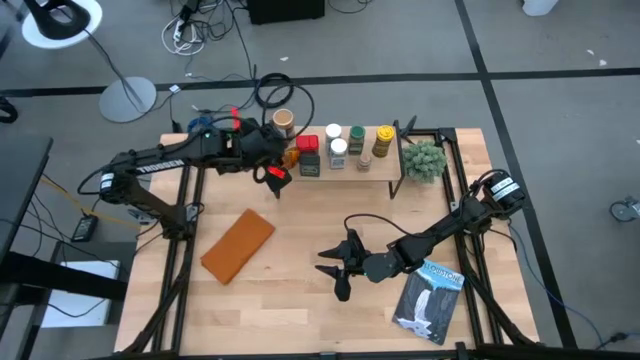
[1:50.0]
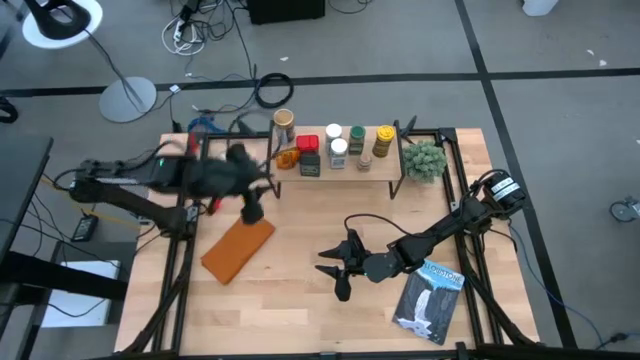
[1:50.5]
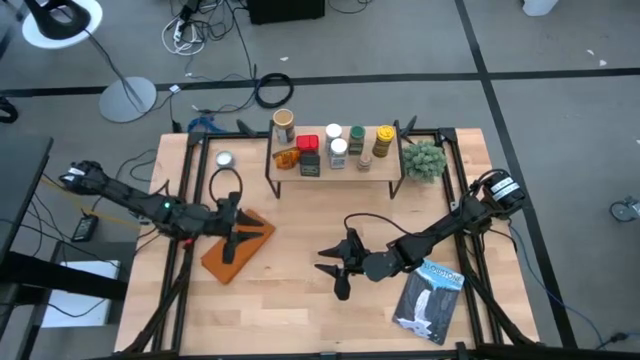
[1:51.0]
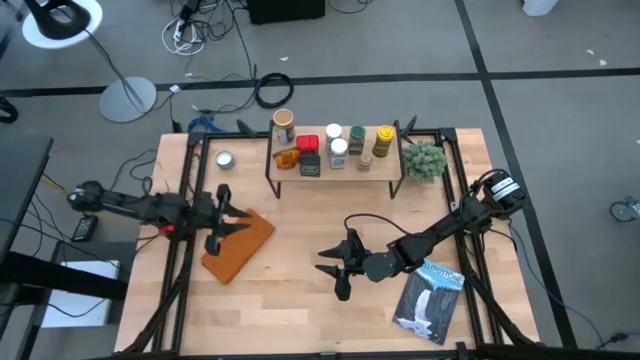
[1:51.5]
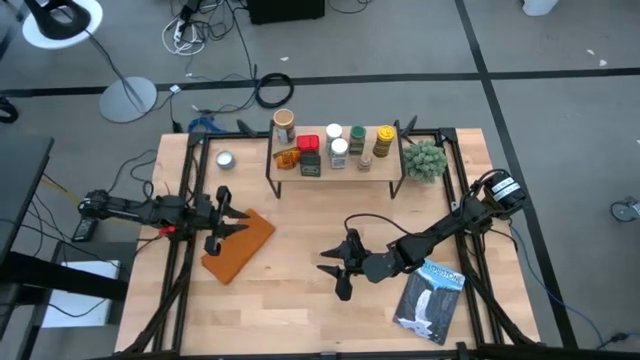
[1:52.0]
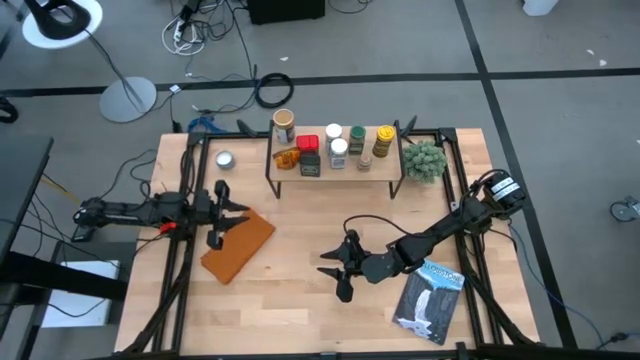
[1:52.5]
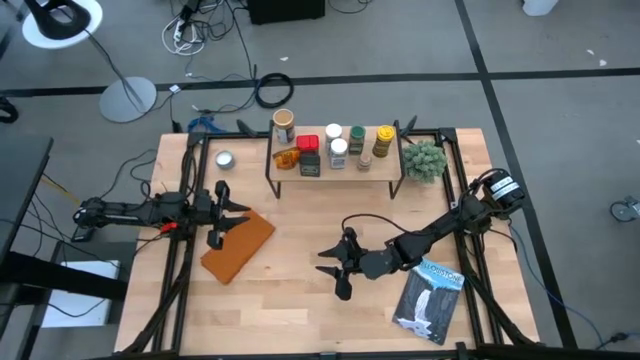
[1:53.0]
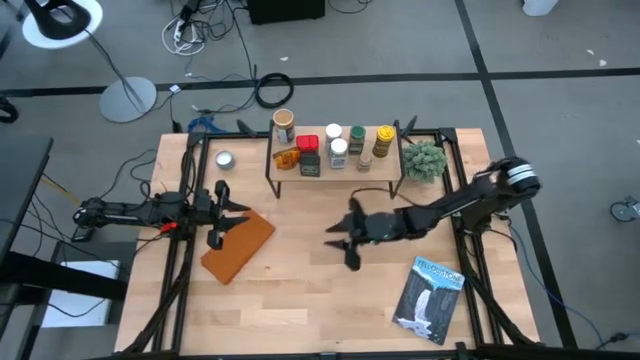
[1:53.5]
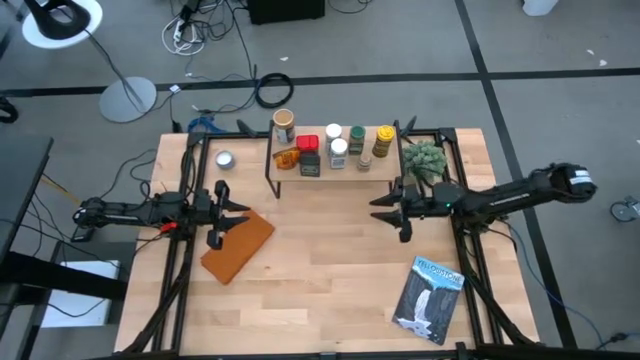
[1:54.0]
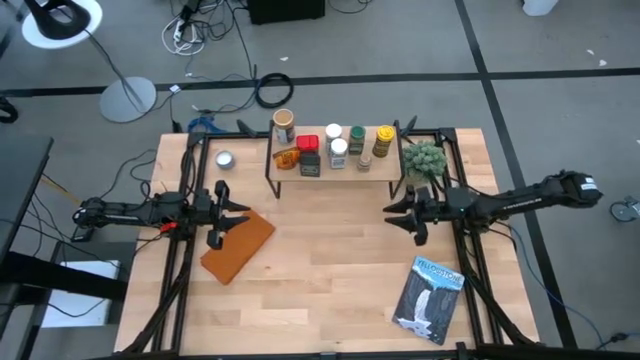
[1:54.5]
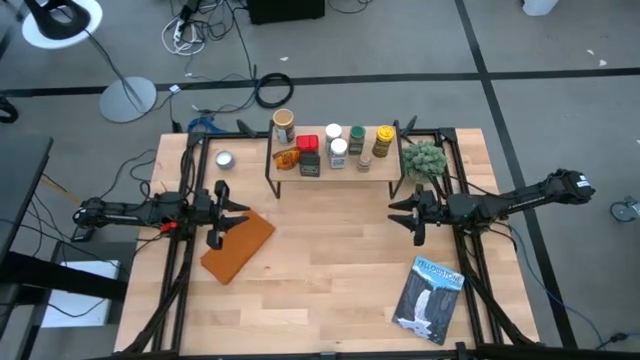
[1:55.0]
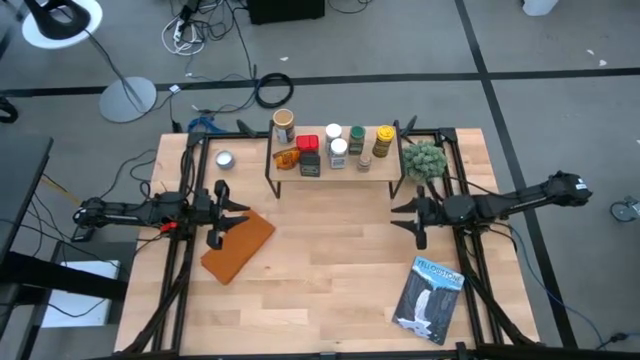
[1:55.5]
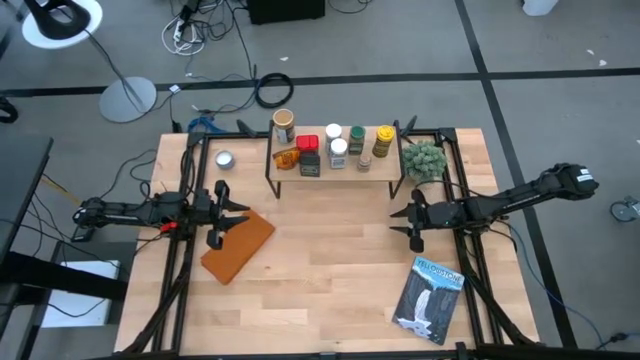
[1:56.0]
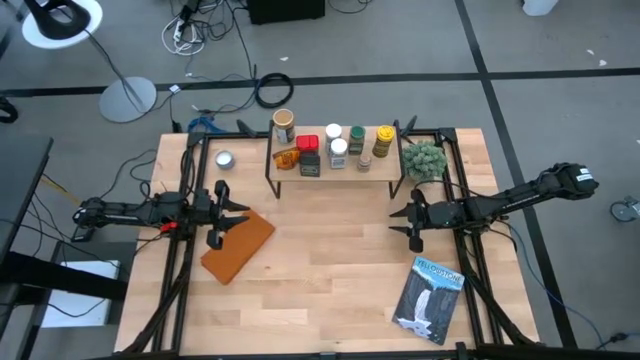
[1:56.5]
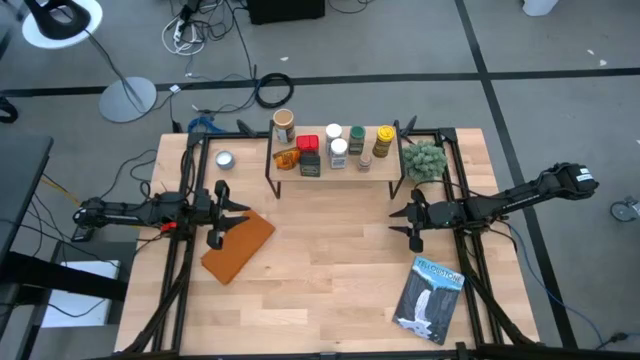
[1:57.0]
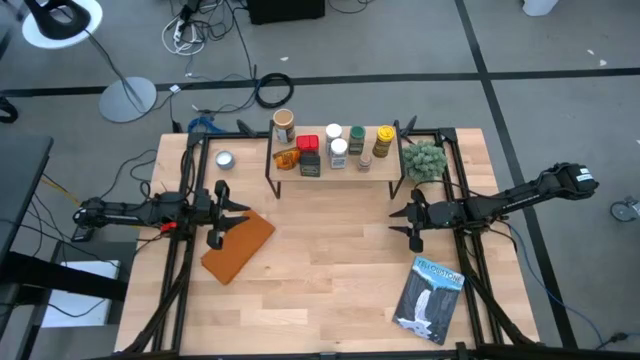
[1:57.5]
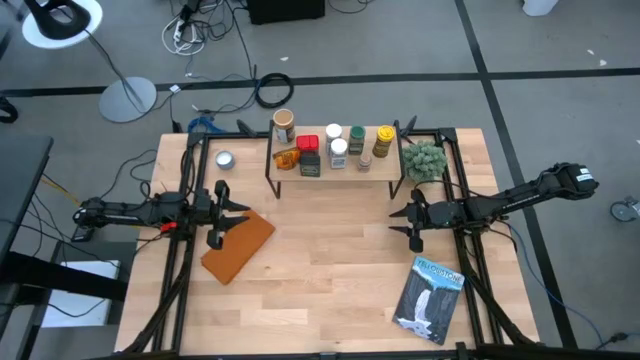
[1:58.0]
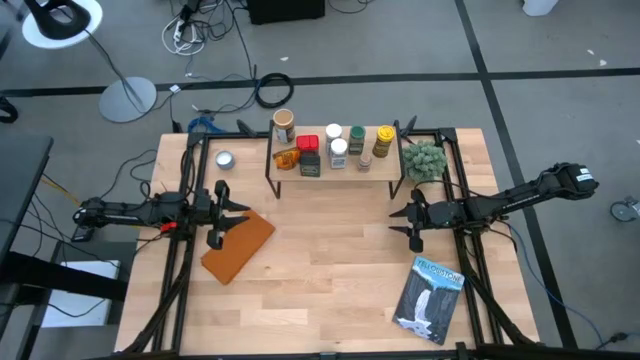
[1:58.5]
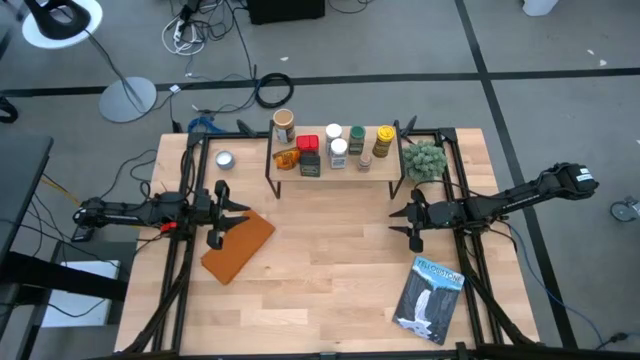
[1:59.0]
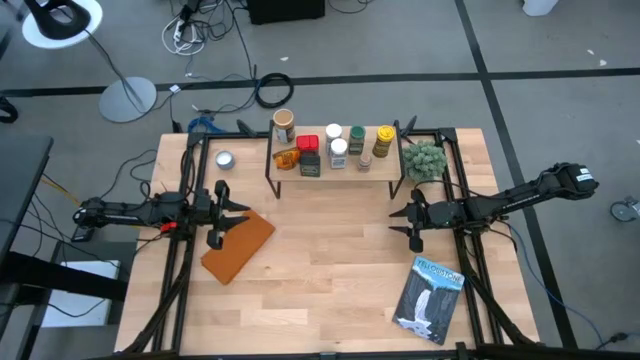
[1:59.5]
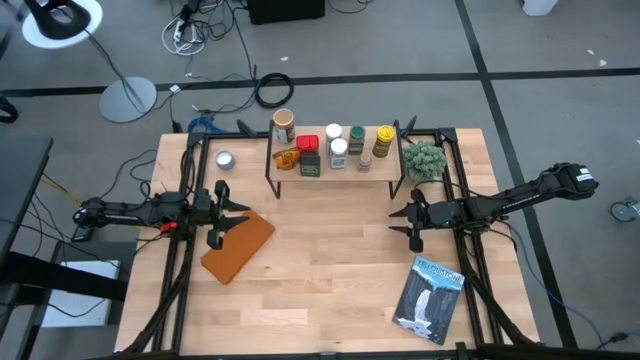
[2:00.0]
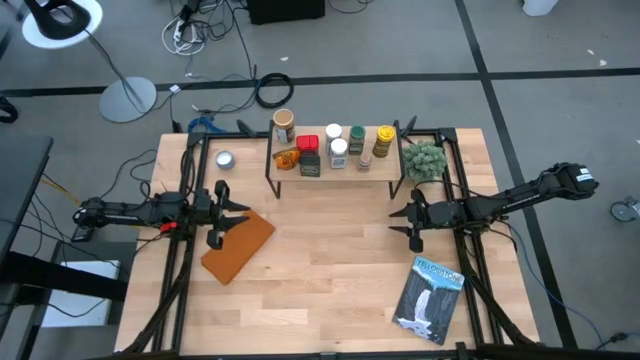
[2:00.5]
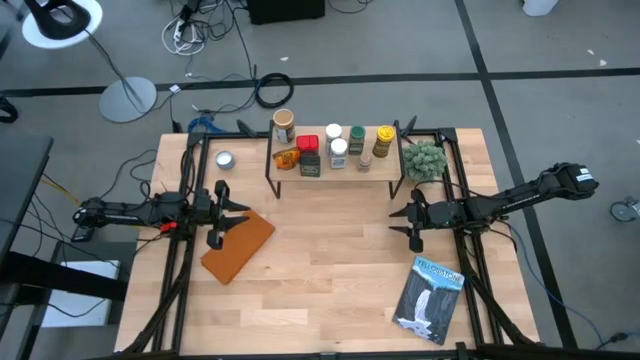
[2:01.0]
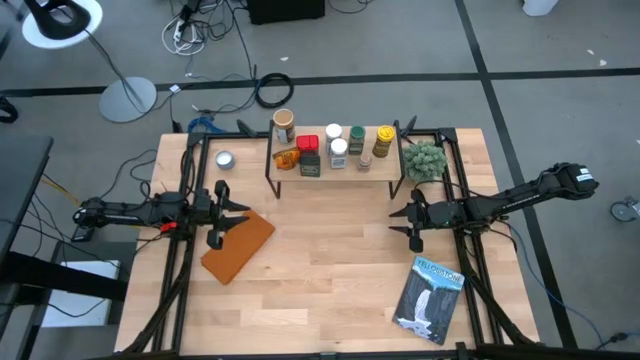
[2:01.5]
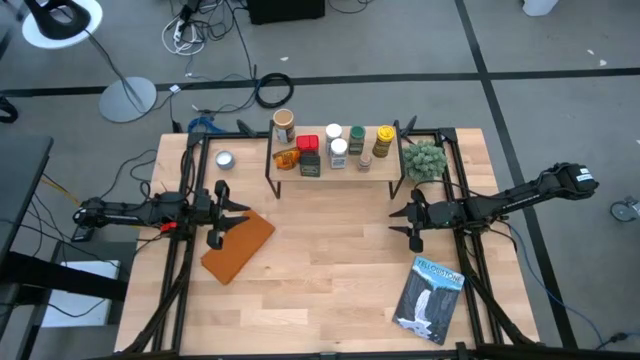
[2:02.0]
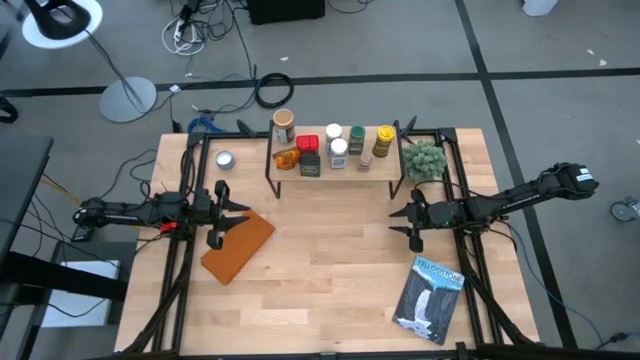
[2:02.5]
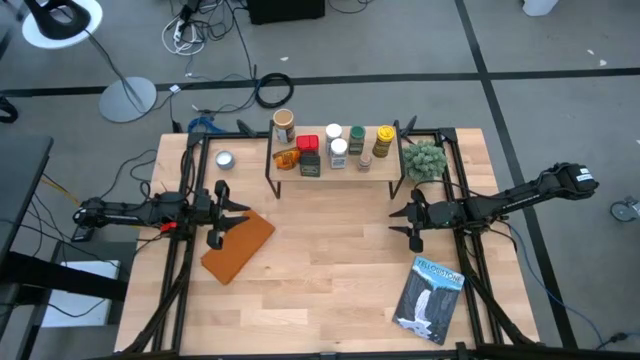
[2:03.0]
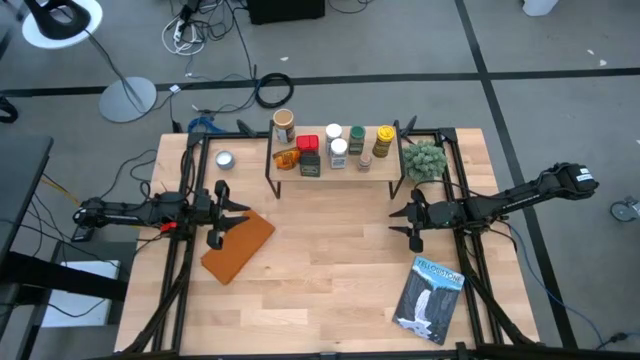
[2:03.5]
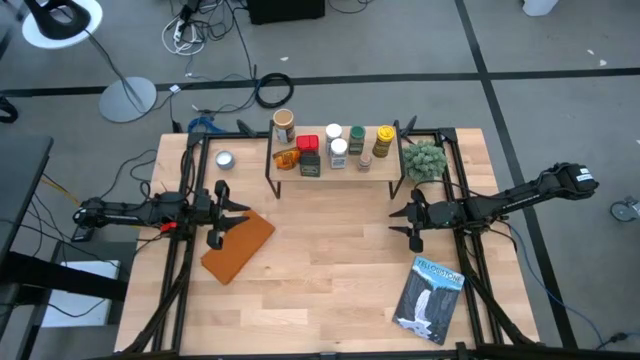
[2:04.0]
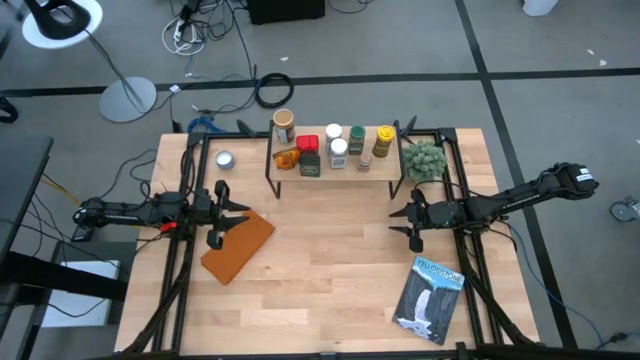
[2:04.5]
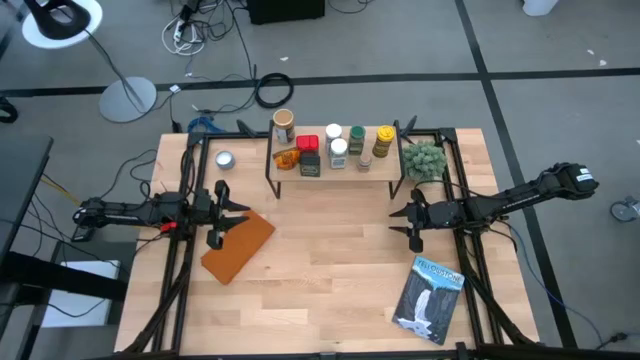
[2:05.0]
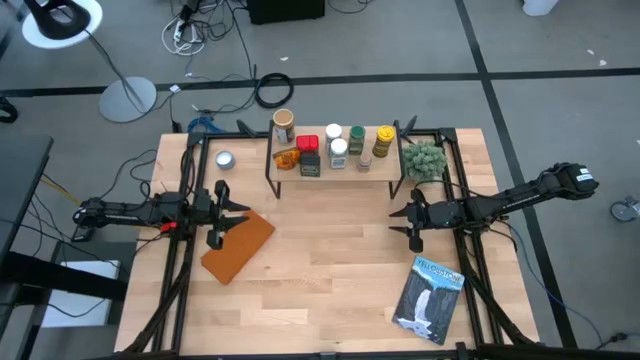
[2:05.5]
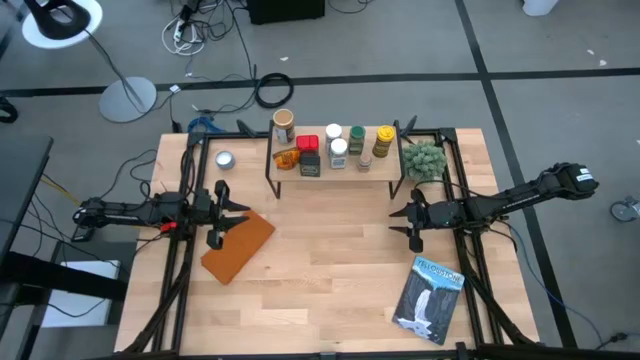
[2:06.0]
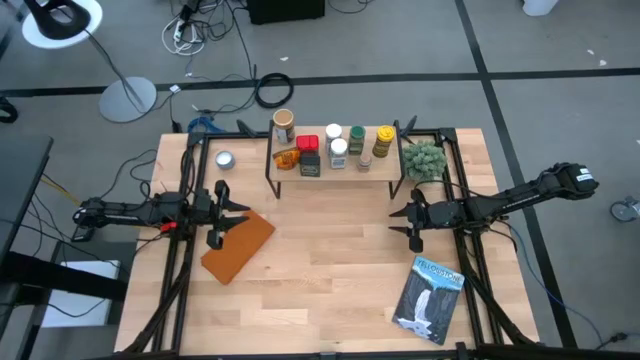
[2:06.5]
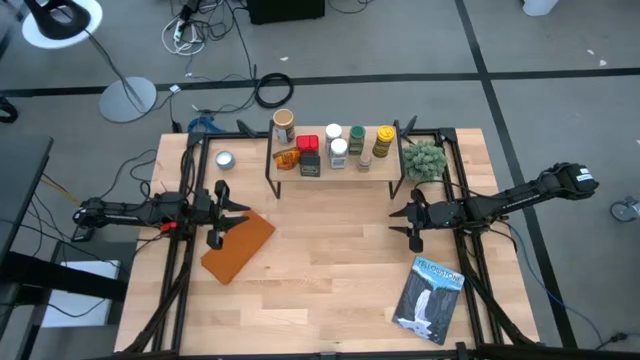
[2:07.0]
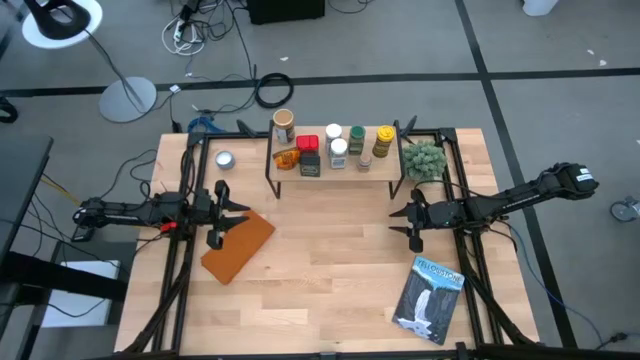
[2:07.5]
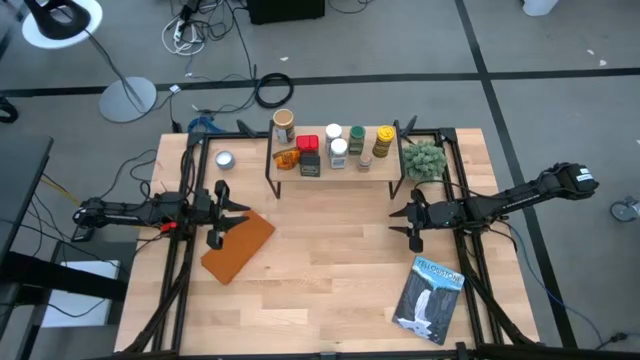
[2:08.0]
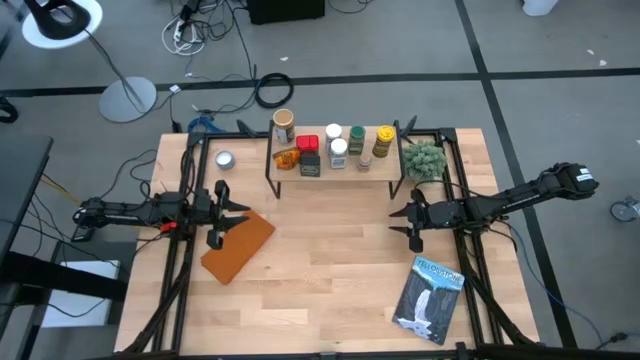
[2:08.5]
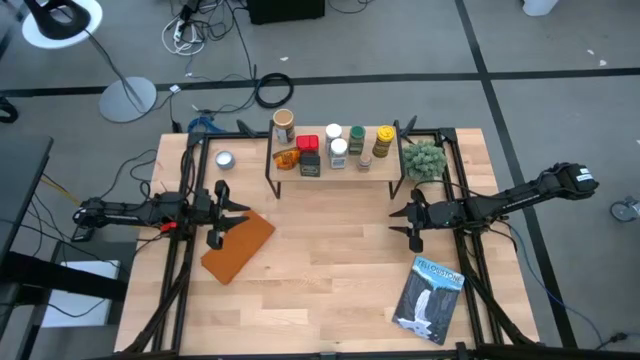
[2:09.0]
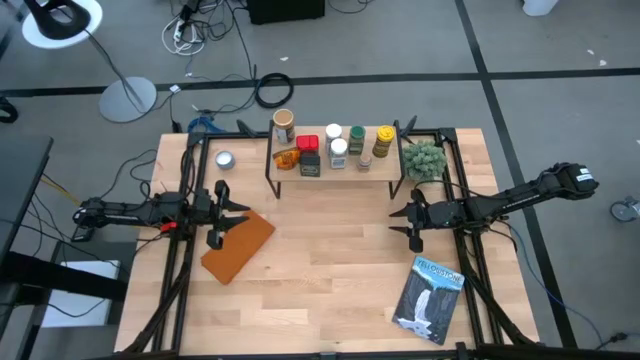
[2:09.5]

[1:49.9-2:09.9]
Task: Shelf spices
Return to Home Position
